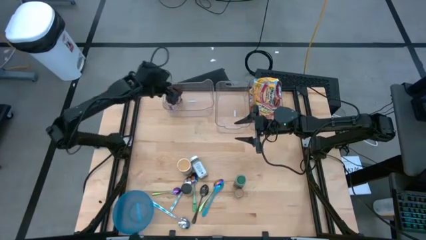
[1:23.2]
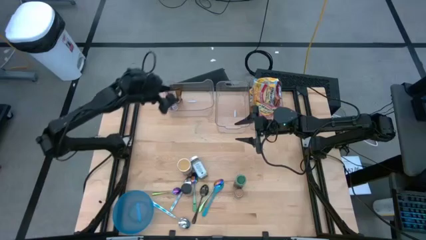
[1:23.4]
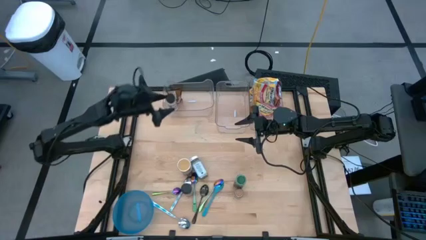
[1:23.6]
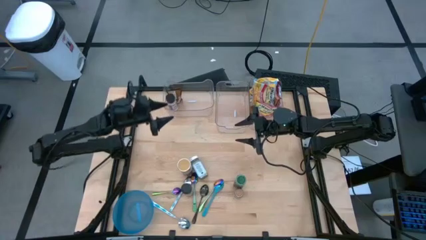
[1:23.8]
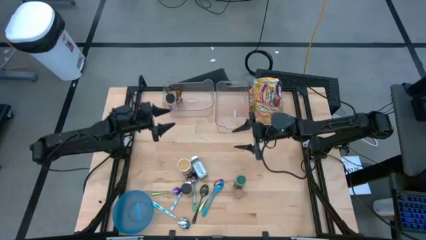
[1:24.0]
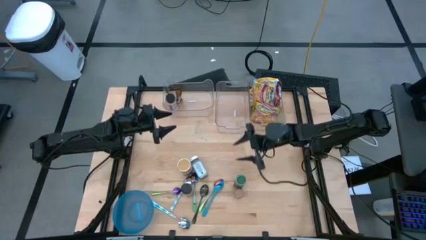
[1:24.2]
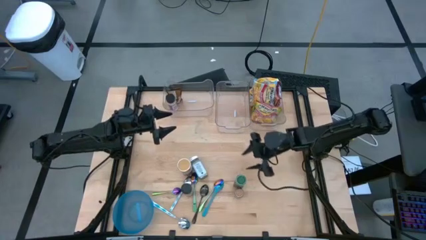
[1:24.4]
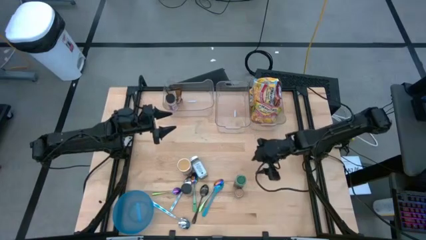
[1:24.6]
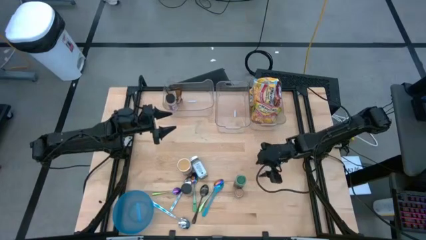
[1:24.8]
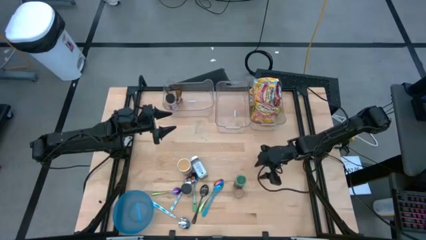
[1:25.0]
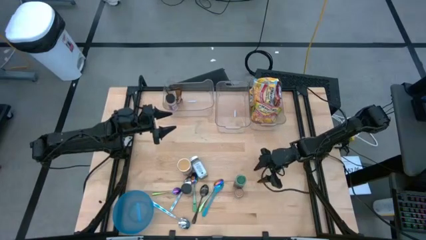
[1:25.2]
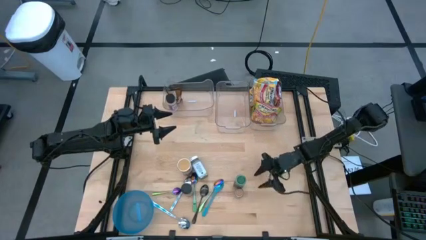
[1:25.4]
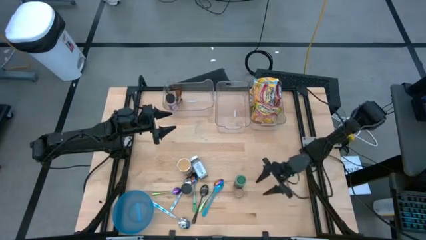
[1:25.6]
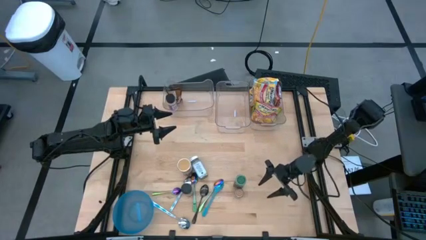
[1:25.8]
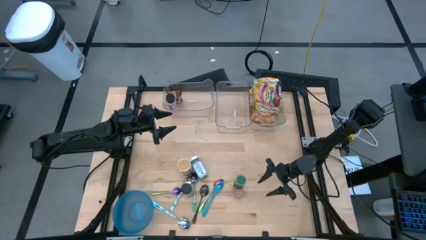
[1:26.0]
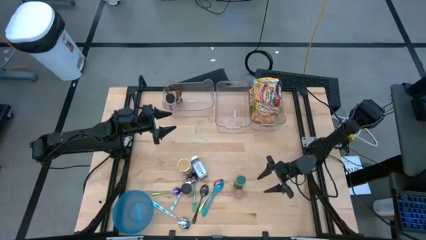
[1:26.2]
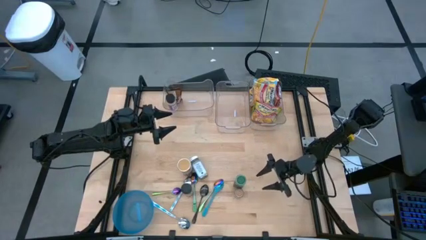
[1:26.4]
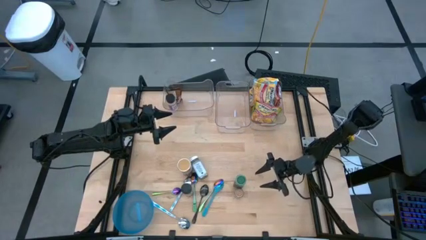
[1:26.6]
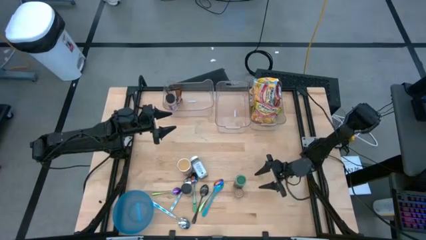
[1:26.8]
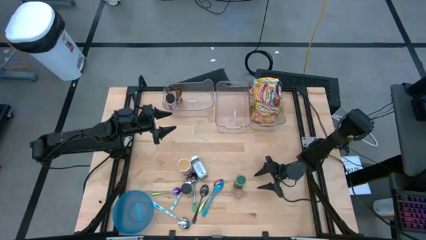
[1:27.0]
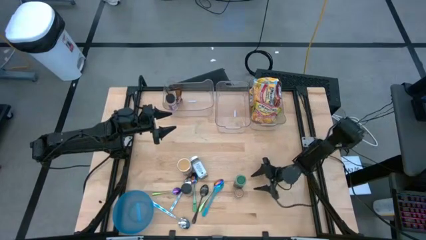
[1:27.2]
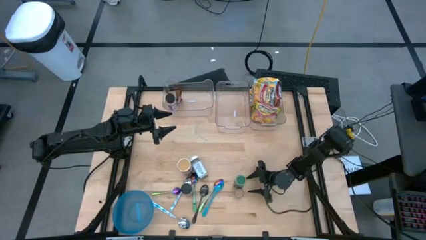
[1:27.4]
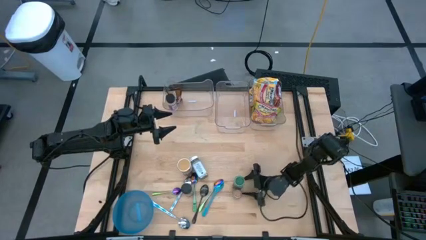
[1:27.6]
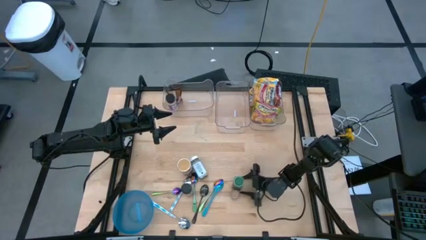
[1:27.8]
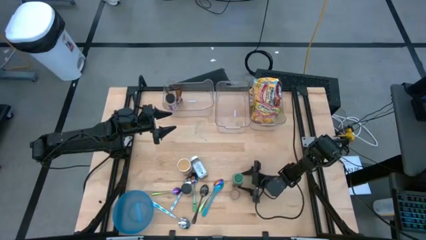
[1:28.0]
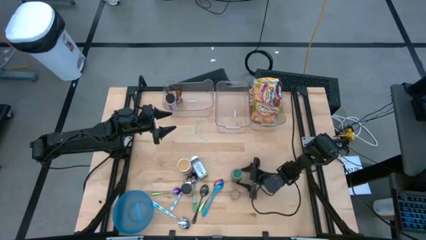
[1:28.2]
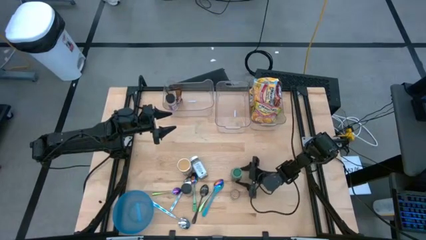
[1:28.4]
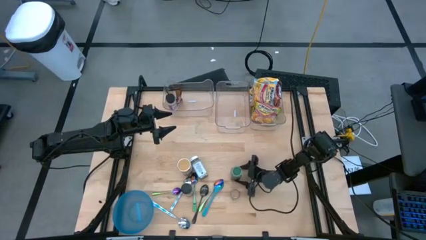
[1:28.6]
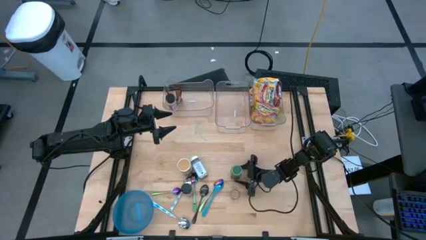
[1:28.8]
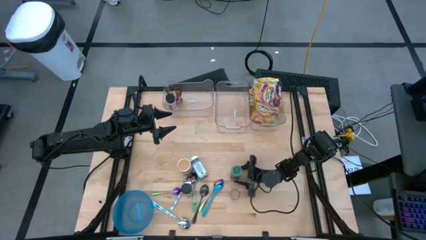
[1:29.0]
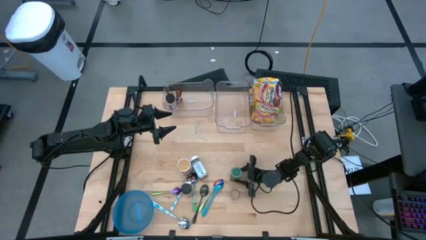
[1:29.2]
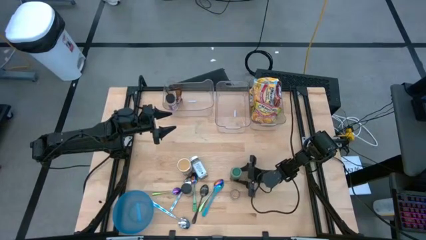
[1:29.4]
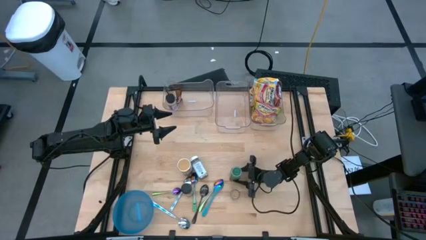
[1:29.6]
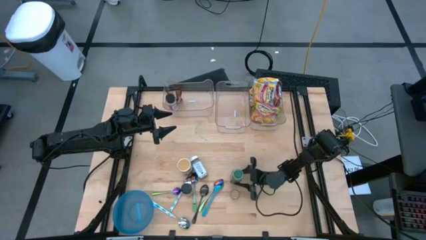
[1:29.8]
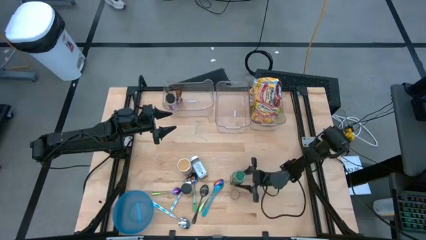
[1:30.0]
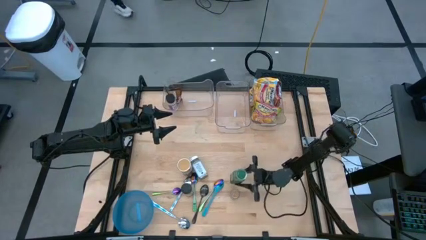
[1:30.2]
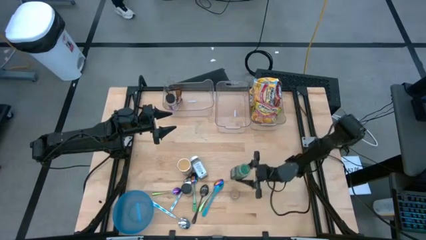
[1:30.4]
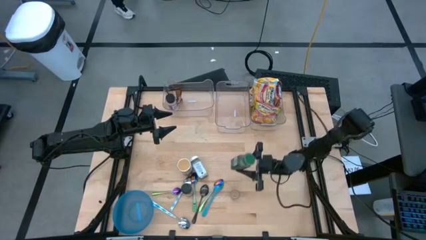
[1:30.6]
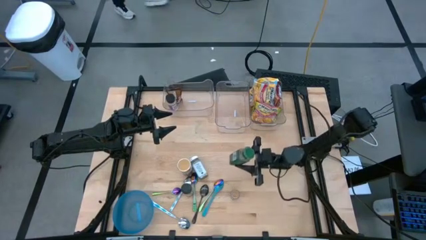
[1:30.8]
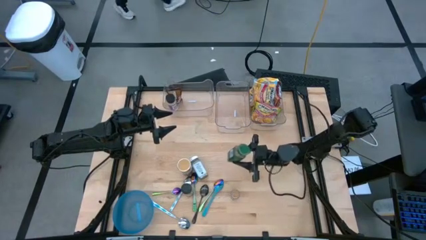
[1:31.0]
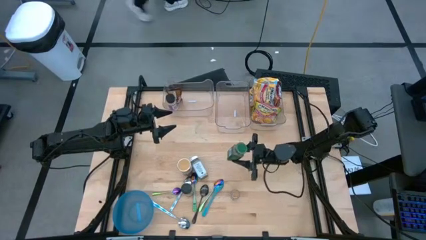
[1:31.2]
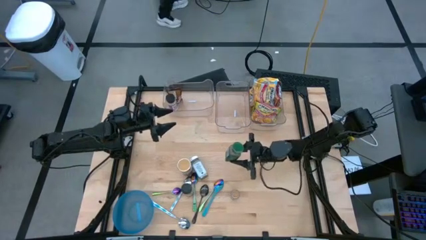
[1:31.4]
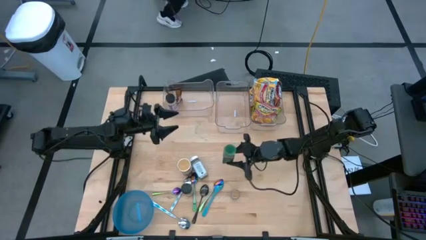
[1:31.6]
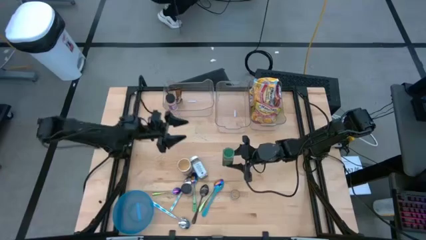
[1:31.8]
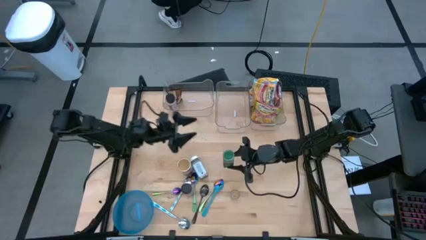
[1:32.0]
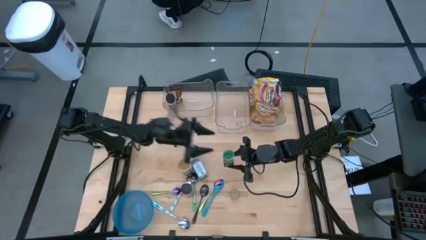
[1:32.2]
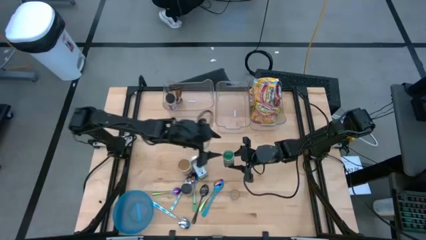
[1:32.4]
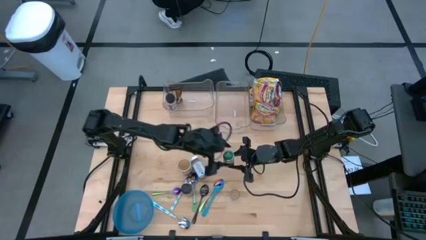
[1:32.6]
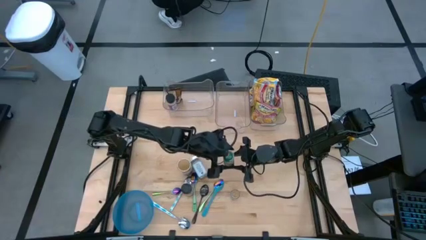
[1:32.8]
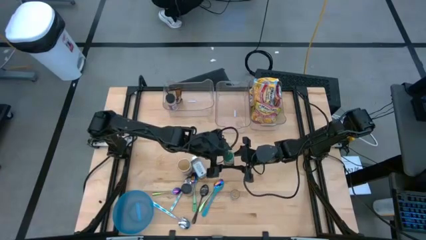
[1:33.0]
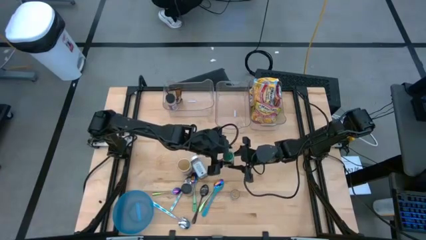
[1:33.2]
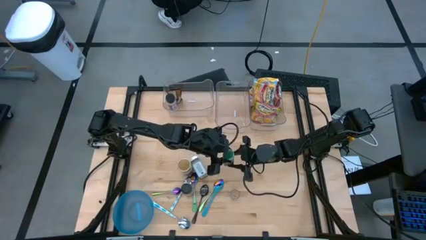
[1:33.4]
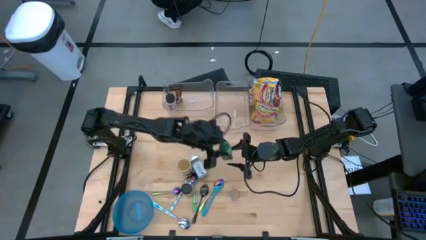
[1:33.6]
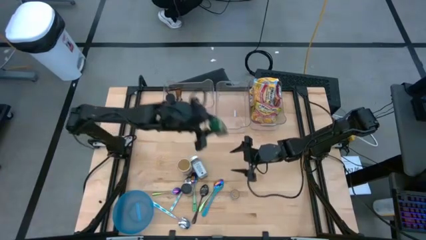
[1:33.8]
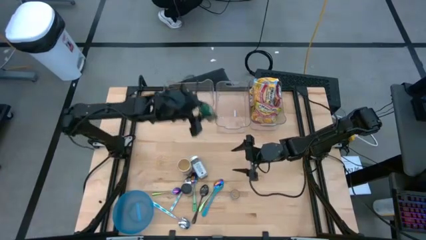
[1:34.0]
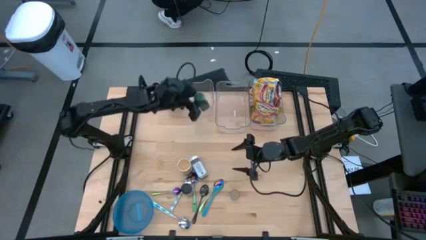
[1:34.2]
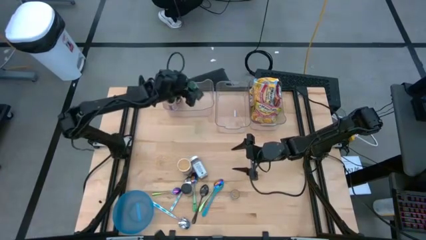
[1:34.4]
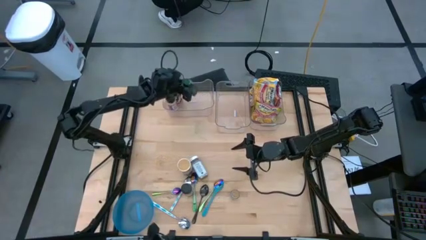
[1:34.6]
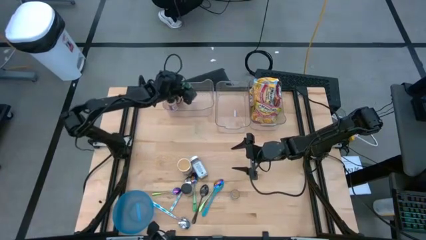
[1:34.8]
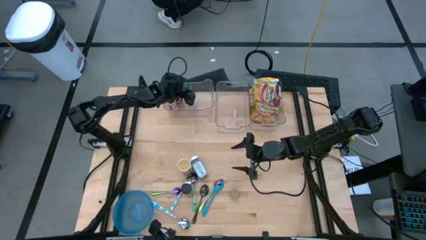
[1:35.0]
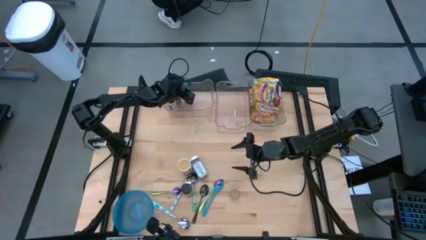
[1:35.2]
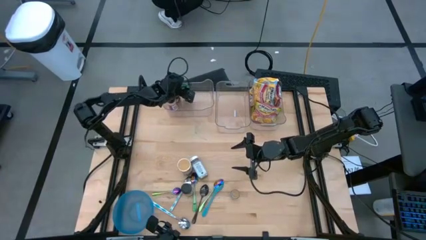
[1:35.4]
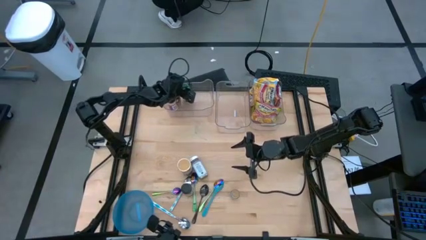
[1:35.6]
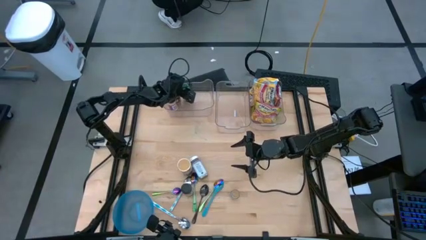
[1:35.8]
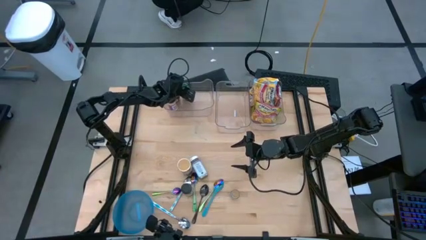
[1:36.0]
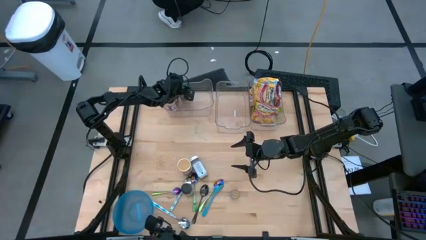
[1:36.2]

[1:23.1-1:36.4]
Task: Pick & Place Food Item
Put the green seasoning bottle into the left transparent bin

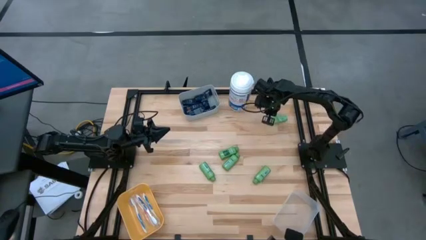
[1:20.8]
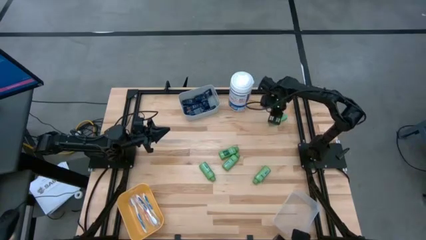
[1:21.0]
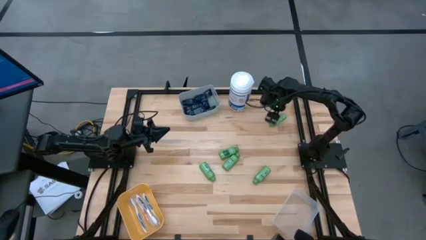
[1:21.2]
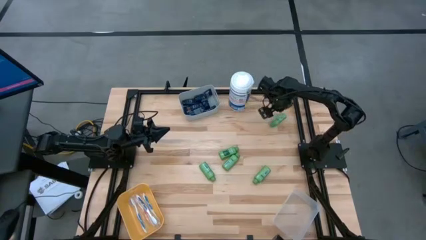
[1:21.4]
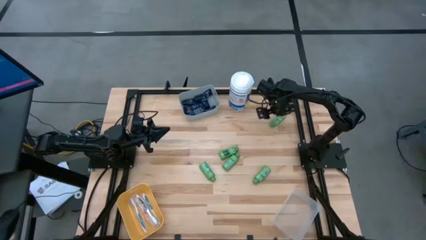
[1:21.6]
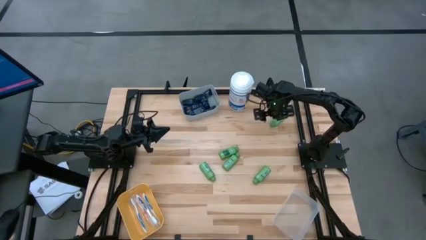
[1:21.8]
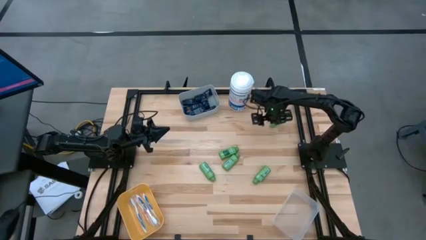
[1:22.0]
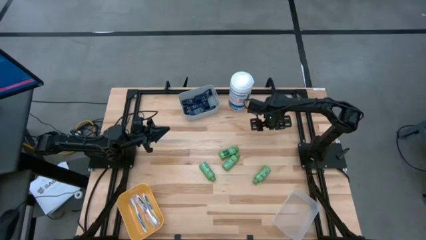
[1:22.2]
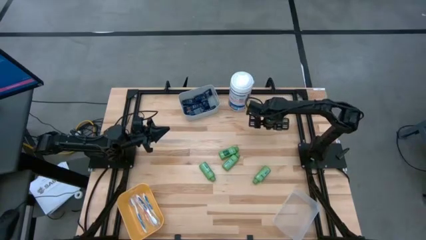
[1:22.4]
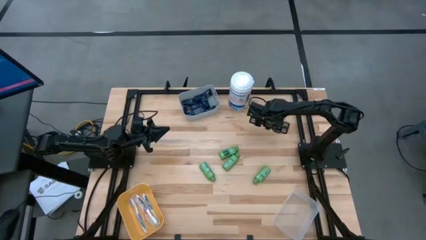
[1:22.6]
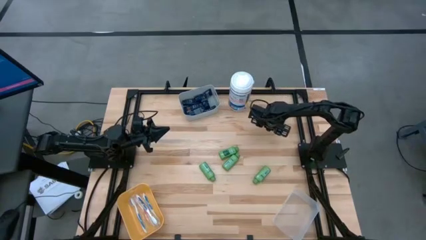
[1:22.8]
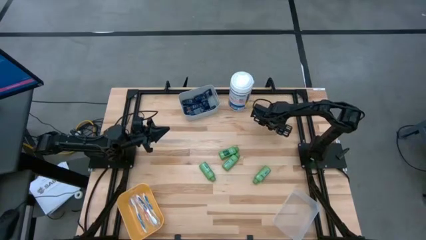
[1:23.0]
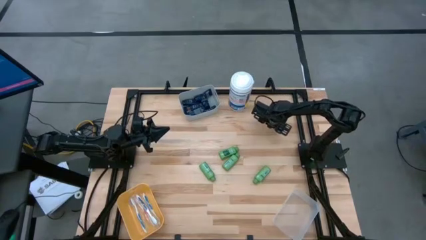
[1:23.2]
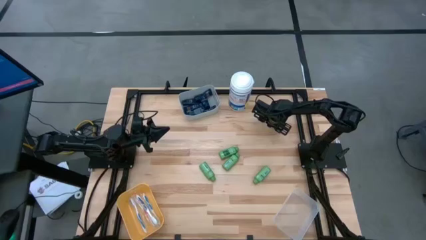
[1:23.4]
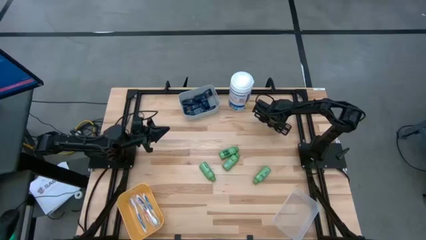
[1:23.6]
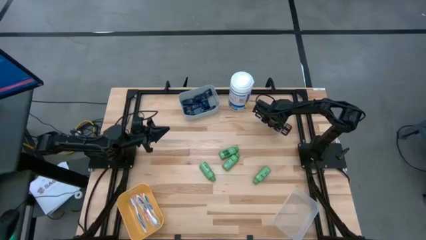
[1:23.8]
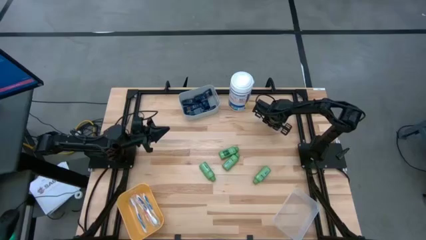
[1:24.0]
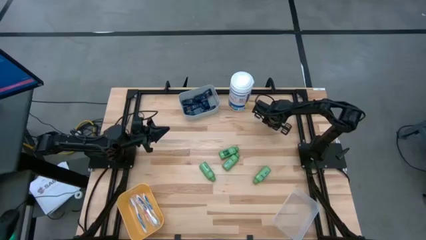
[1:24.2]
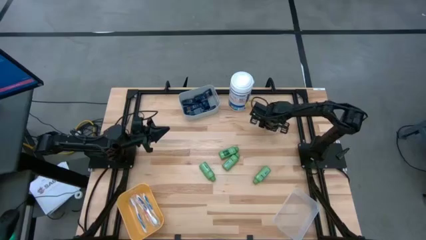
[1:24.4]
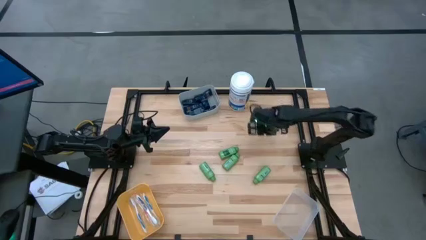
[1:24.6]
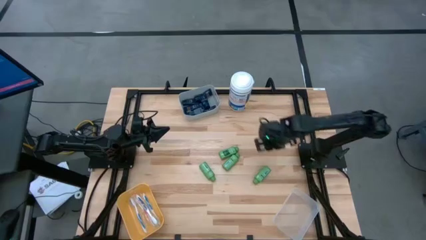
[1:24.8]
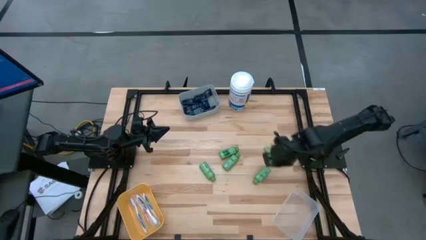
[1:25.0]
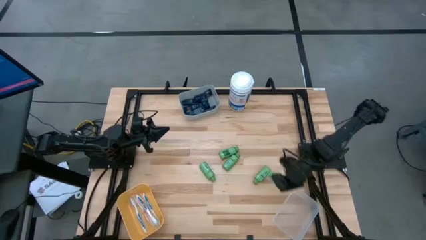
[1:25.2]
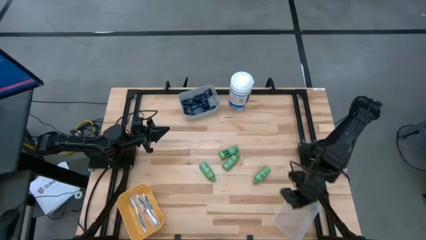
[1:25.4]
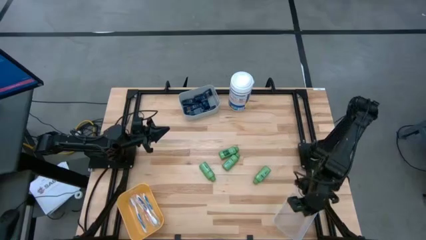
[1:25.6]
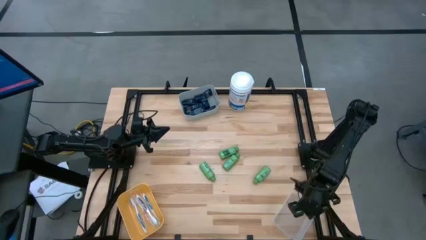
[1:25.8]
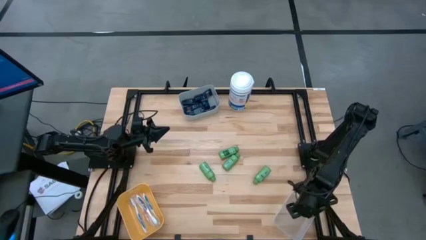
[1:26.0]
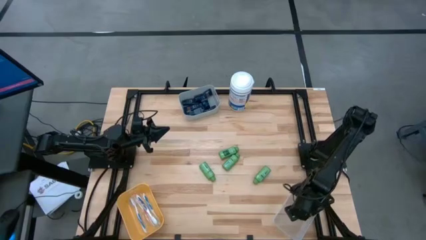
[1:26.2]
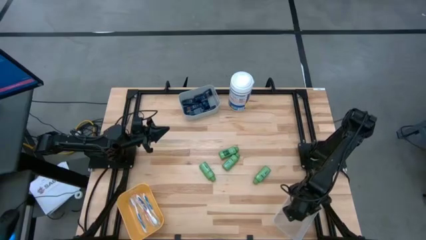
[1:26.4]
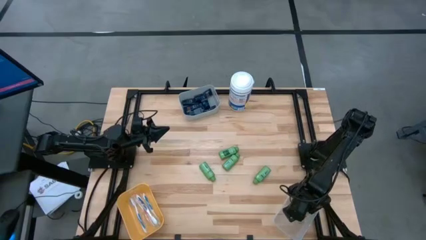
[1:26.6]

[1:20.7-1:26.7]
Task: Pick & Place Travel size toiletries
Put the green shampoo into the transparent bin
